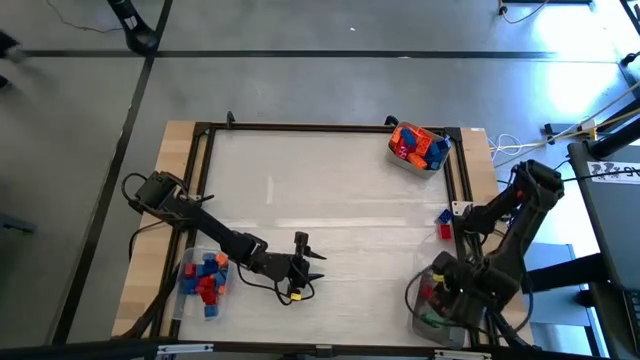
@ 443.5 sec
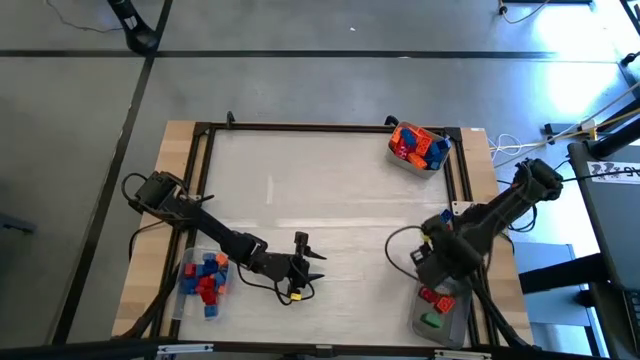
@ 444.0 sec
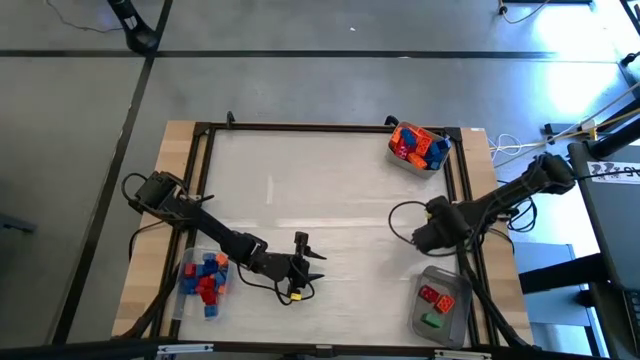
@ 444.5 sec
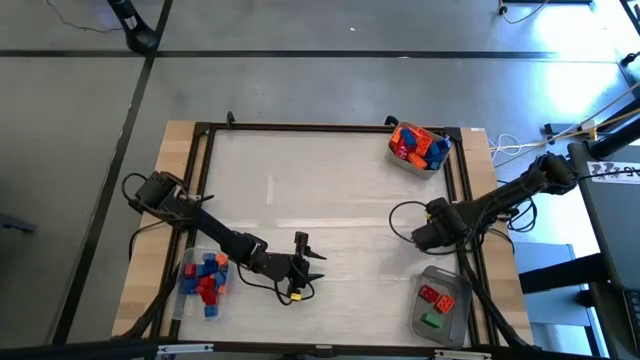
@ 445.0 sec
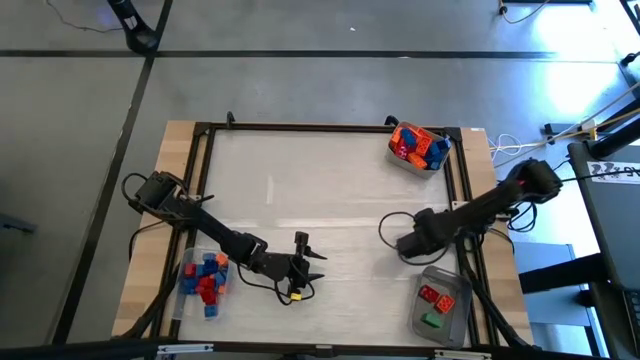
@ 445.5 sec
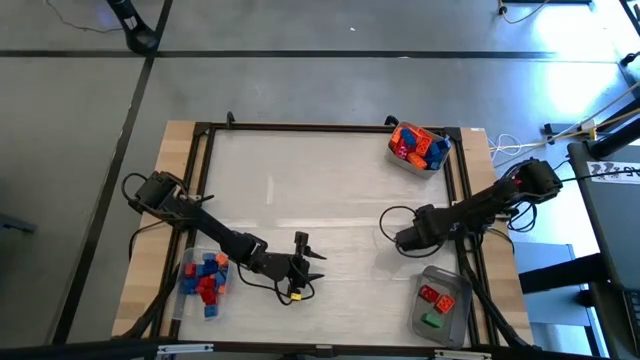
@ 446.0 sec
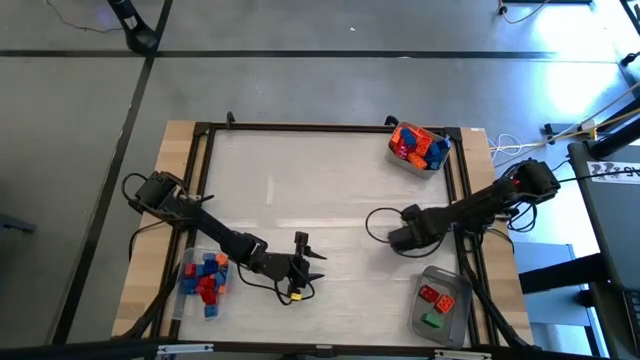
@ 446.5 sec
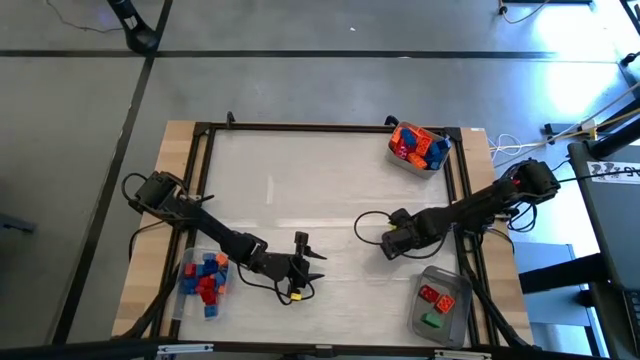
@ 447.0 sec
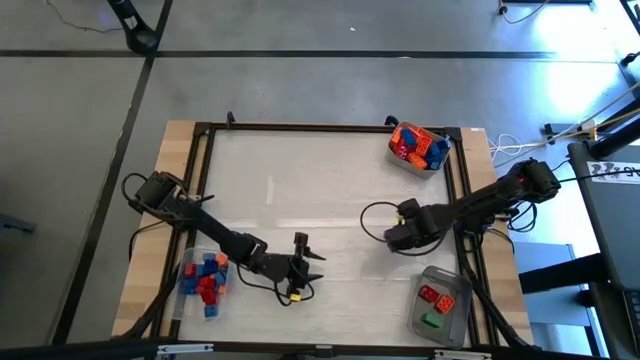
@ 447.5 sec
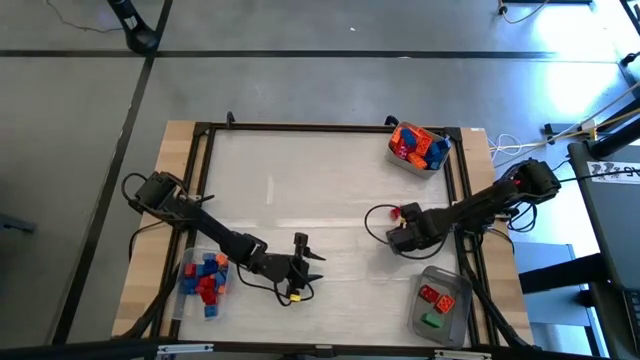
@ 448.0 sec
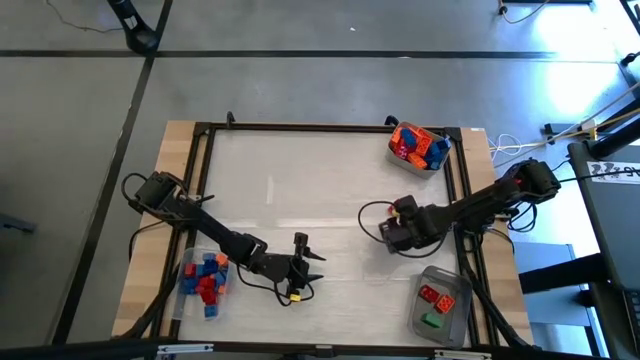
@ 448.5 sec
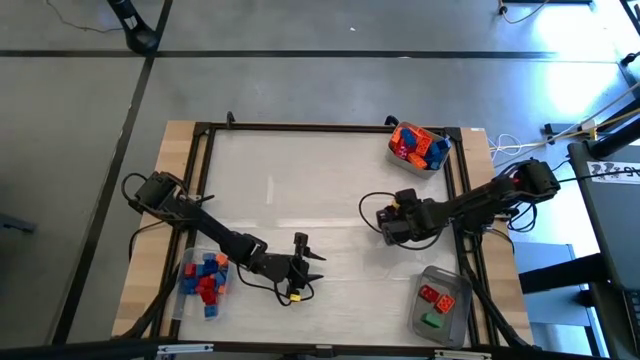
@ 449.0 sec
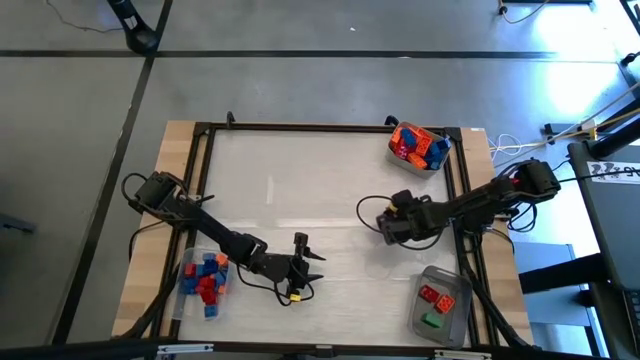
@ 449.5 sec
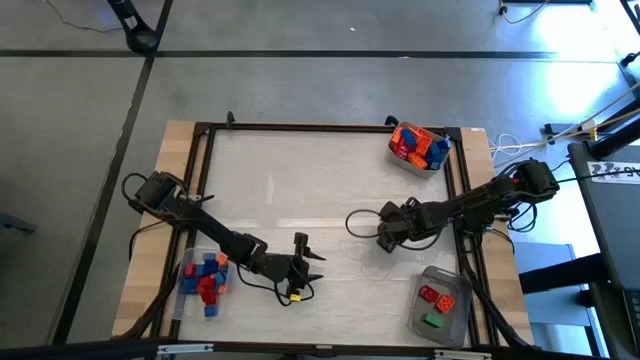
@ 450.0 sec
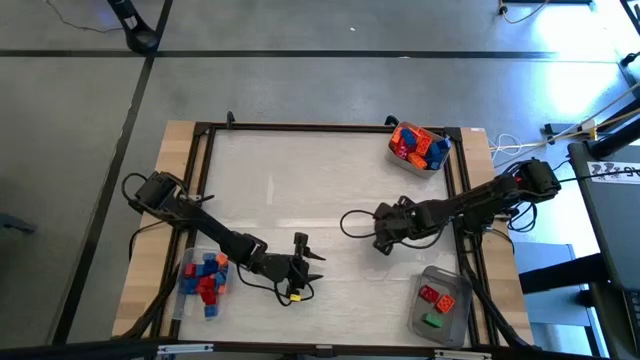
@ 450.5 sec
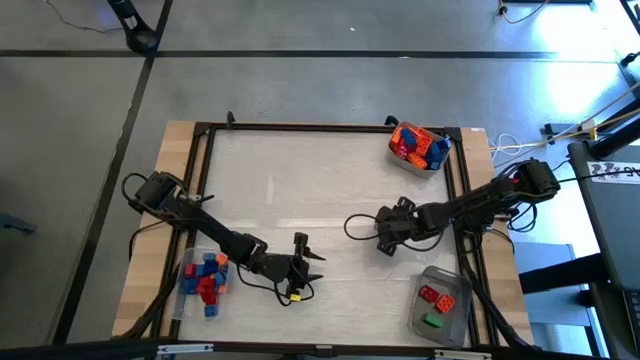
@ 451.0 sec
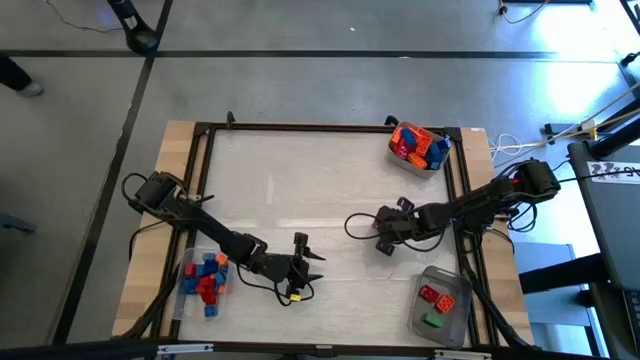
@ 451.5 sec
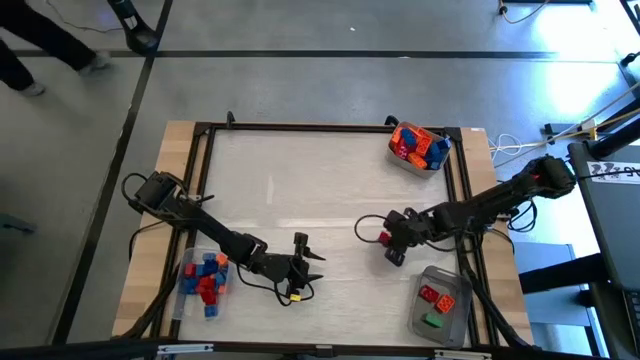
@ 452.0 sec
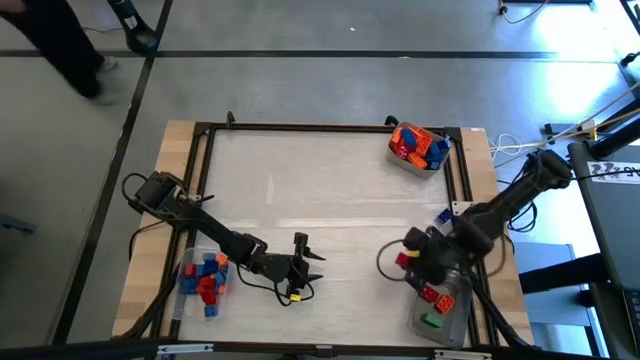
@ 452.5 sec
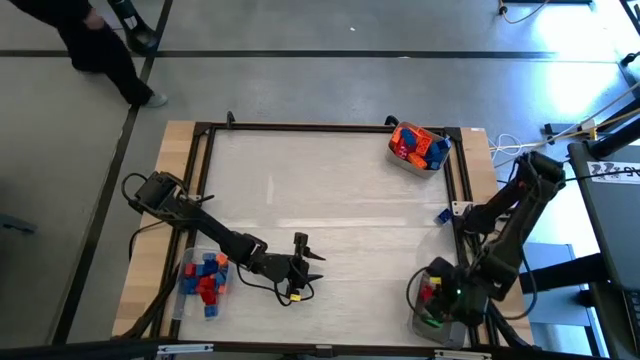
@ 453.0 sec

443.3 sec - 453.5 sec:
Task: Sort blocks by size
Put the orange game piece into the black bin

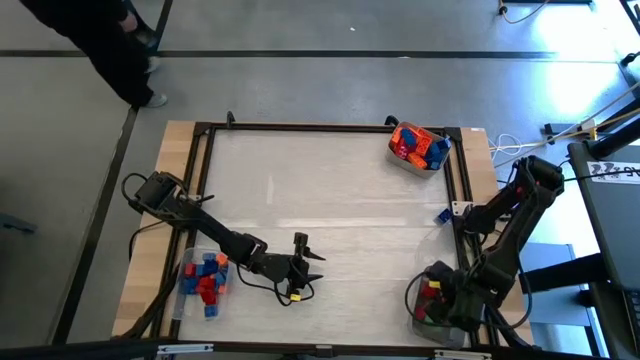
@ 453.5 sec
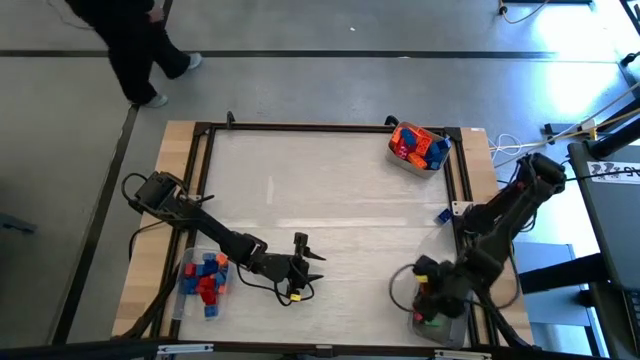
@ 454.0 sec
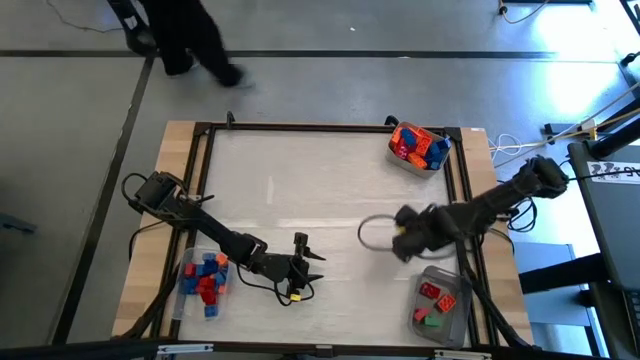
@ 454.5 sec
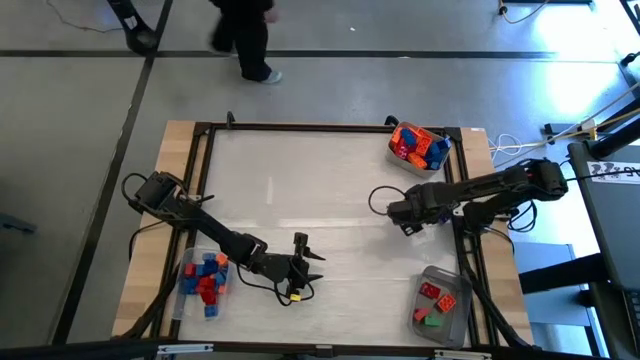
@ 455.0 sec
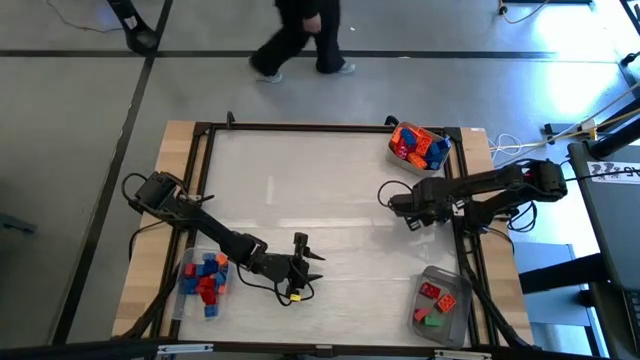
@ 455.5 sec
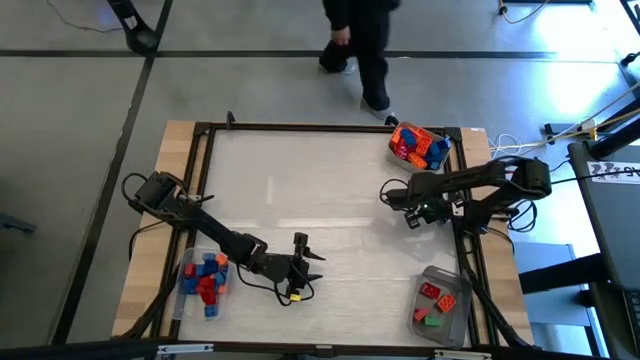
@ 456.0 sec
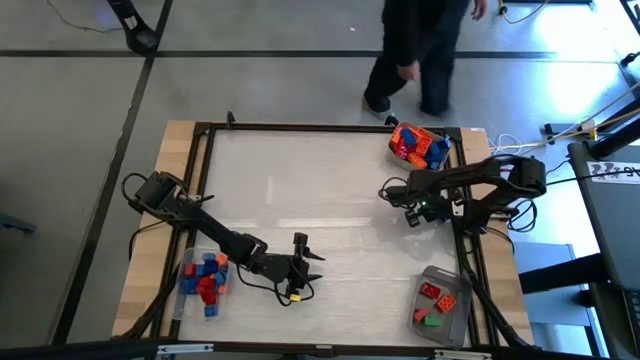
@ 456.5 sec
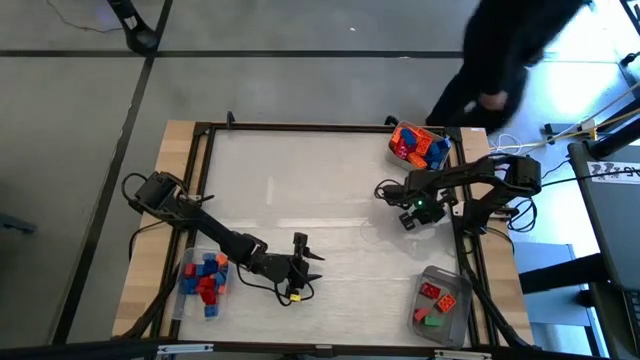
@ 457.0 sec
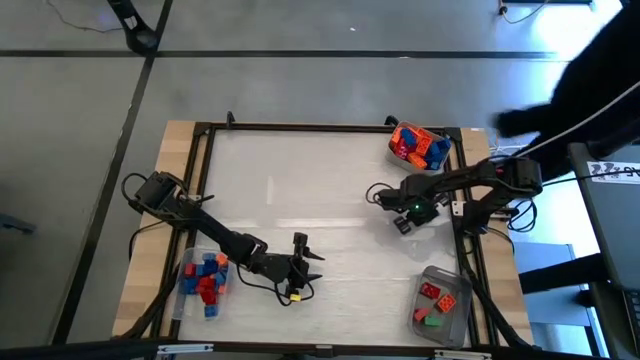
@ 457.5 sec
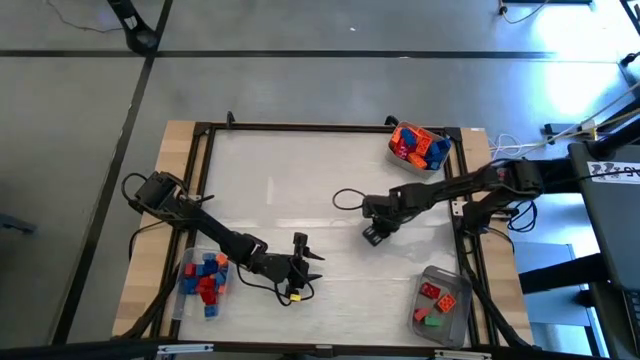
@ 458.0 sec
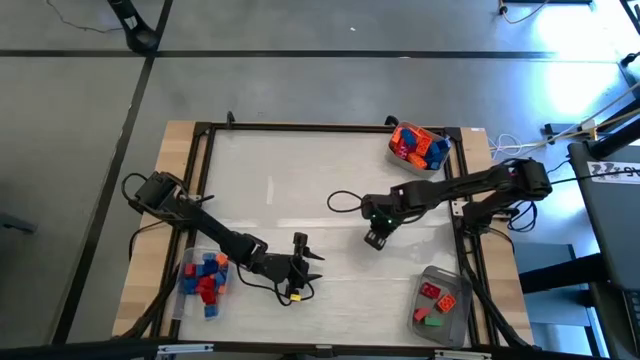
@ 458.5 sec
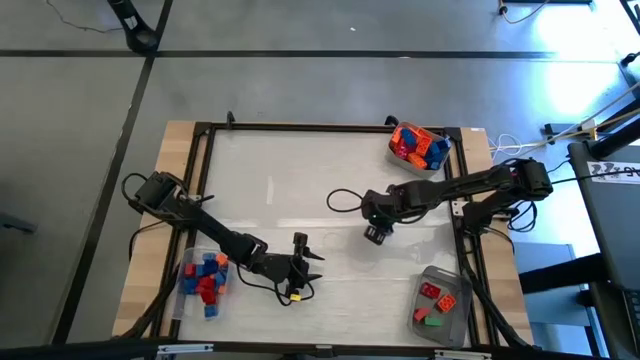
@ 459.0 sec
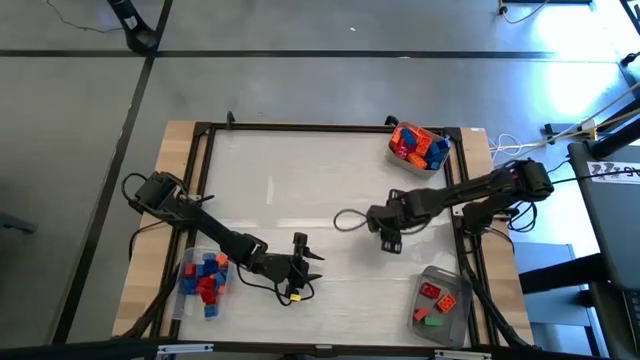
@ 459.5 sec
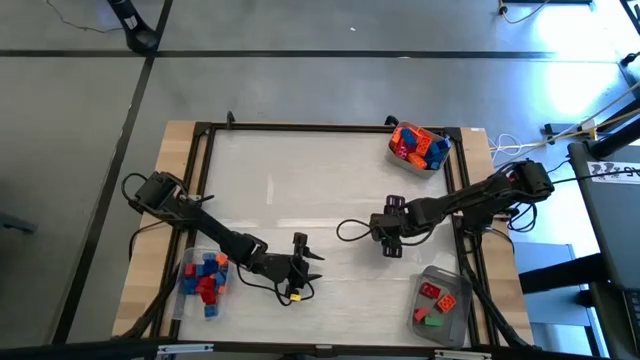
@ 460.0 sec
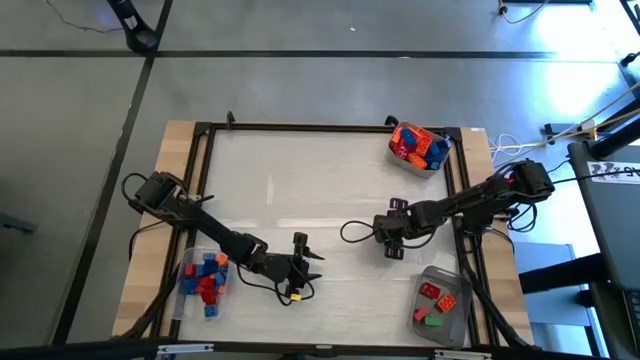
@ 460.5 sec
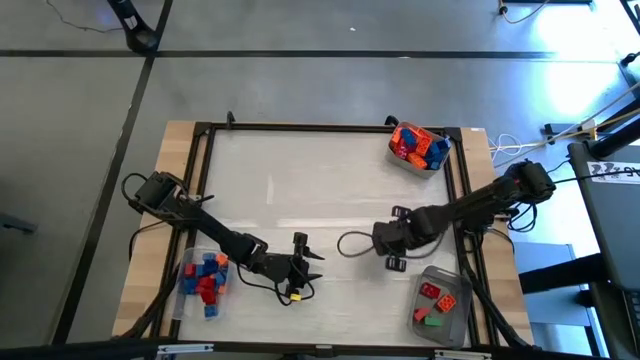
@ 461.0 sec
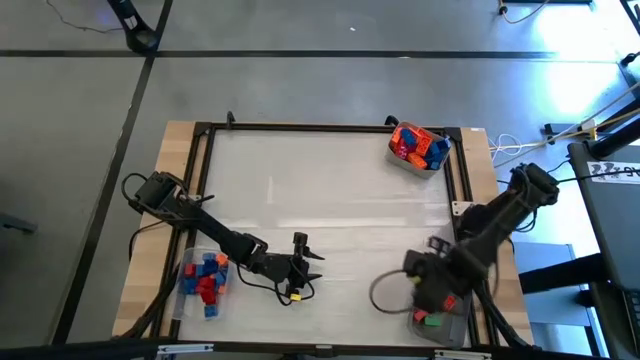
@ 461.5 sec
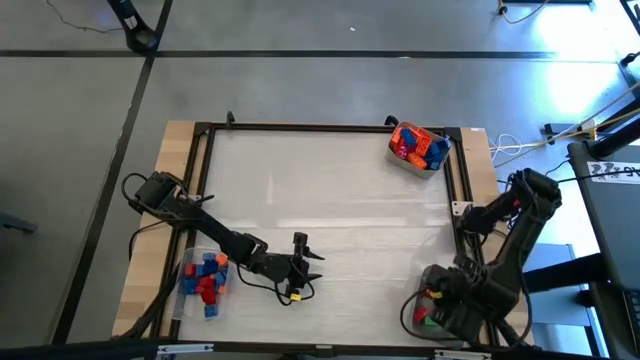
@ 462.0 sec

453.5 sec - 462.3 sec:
Put the blue game piece into the black bin
